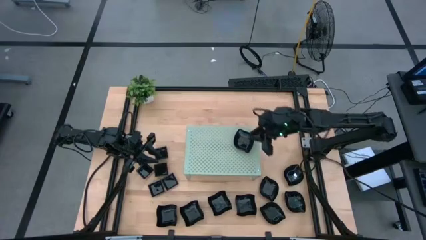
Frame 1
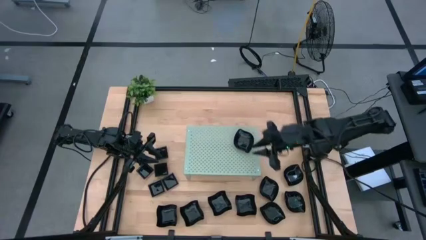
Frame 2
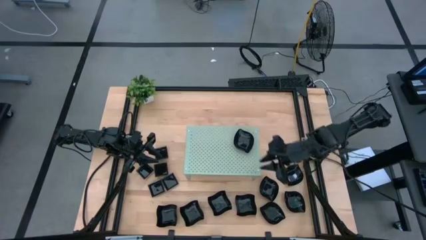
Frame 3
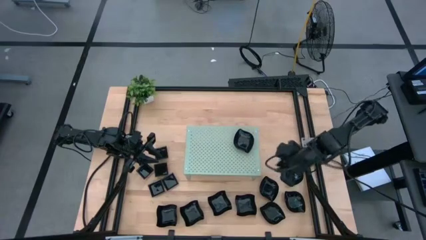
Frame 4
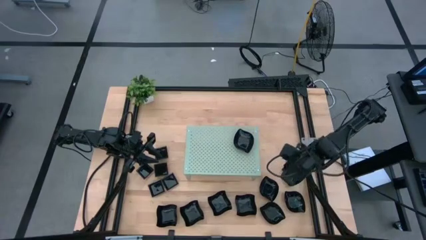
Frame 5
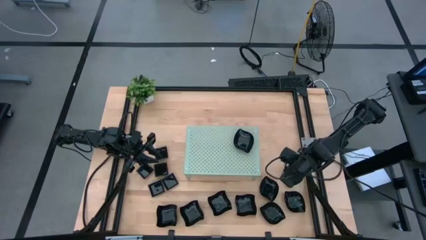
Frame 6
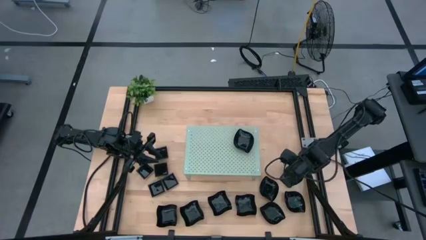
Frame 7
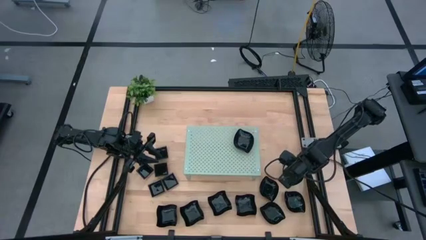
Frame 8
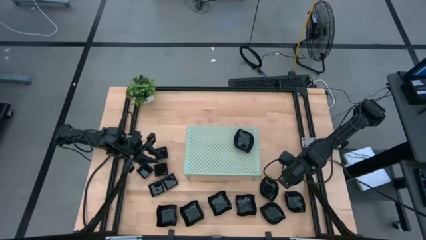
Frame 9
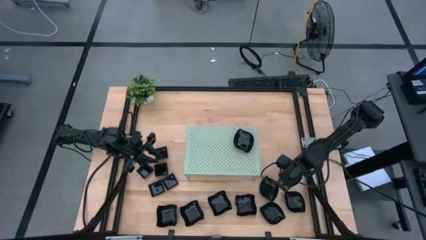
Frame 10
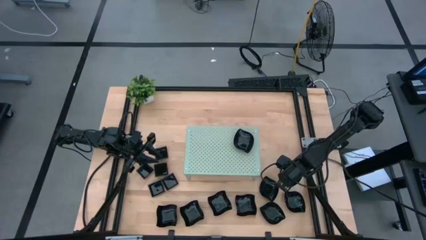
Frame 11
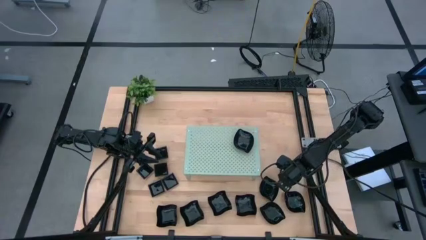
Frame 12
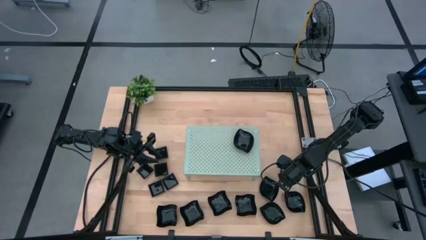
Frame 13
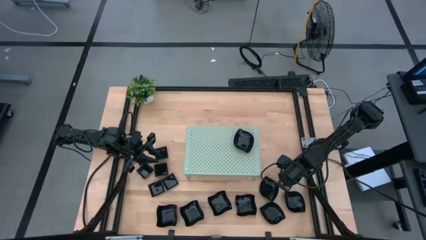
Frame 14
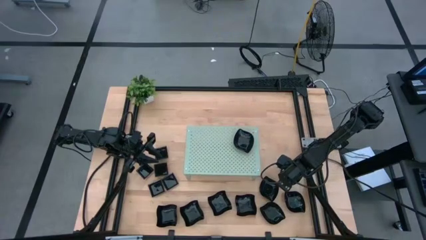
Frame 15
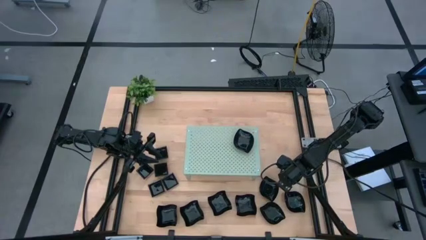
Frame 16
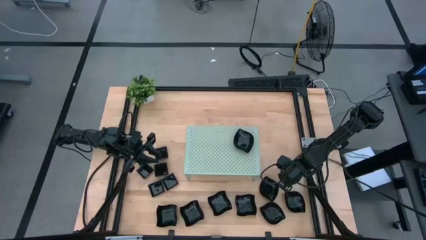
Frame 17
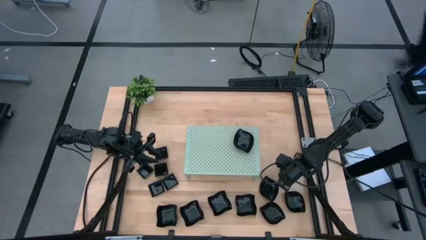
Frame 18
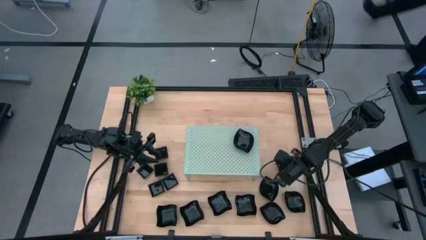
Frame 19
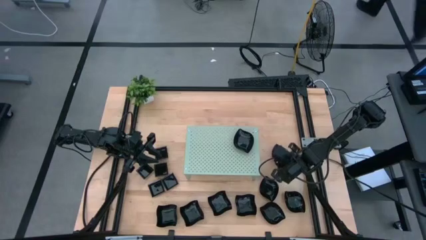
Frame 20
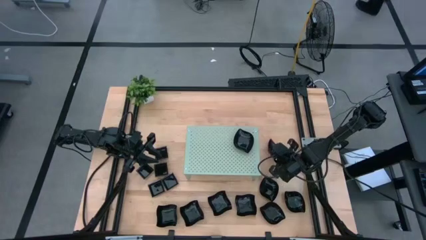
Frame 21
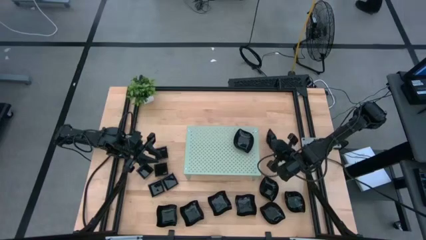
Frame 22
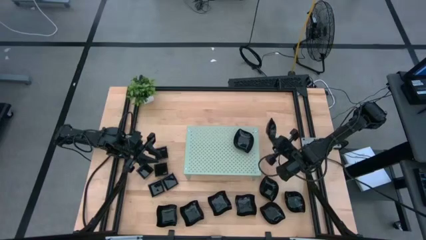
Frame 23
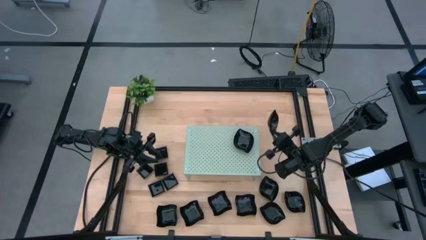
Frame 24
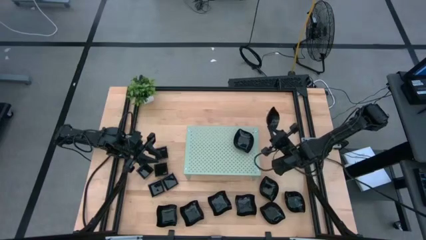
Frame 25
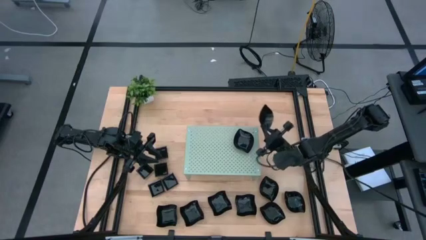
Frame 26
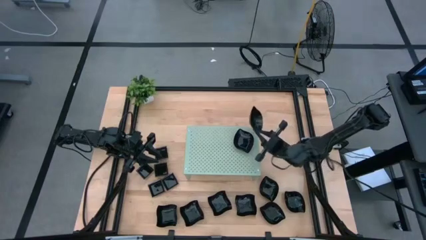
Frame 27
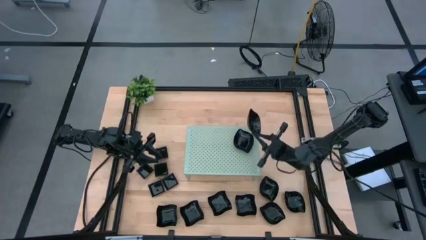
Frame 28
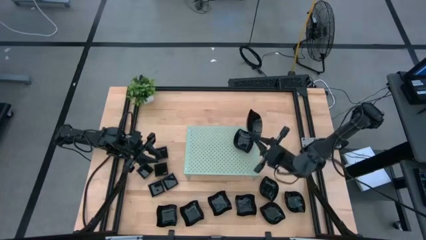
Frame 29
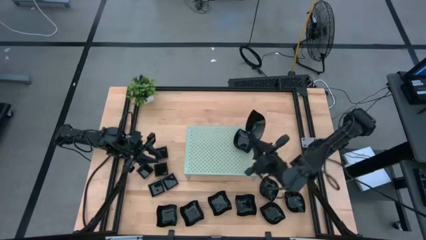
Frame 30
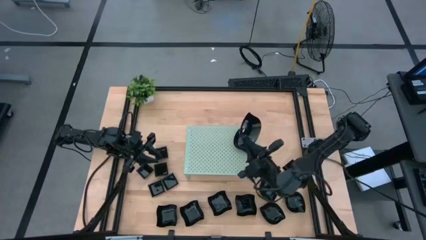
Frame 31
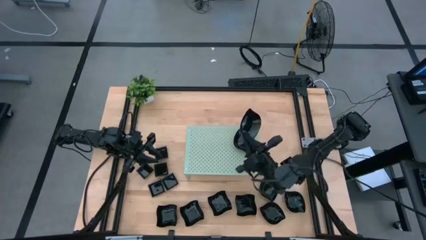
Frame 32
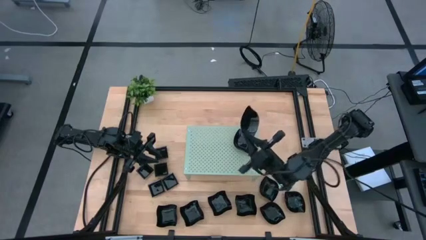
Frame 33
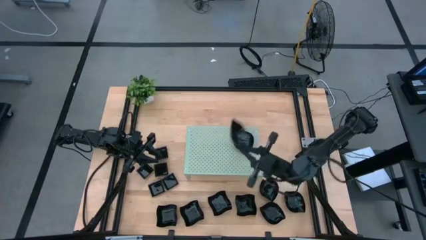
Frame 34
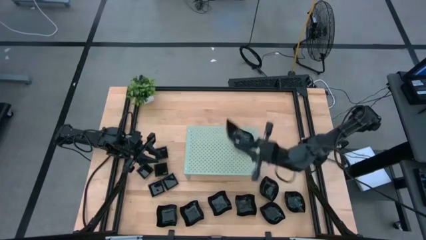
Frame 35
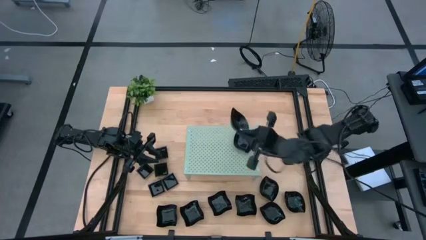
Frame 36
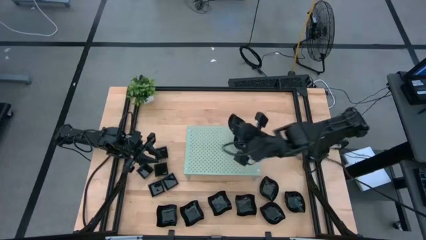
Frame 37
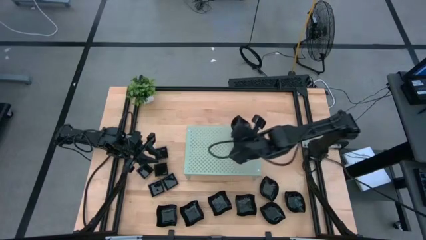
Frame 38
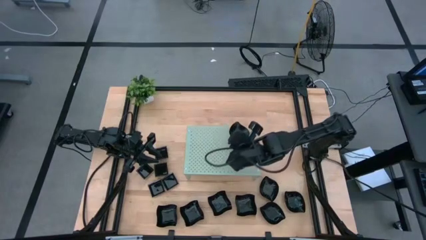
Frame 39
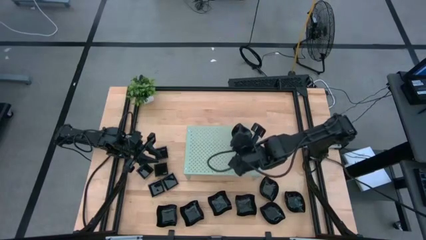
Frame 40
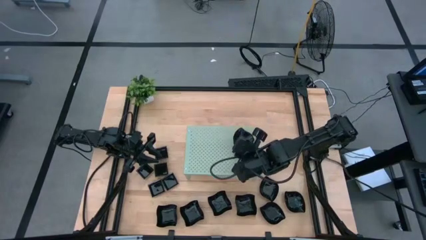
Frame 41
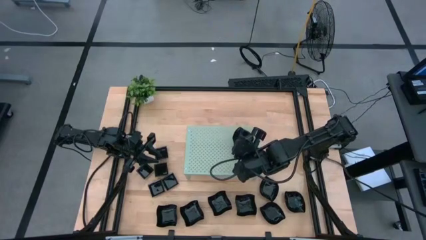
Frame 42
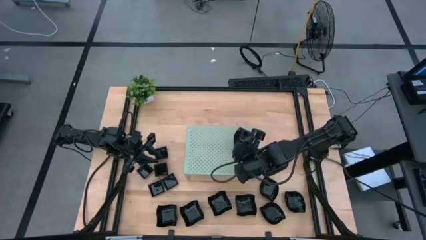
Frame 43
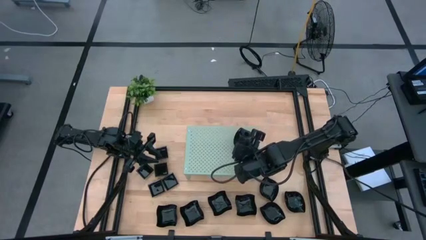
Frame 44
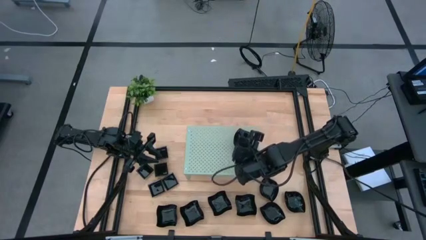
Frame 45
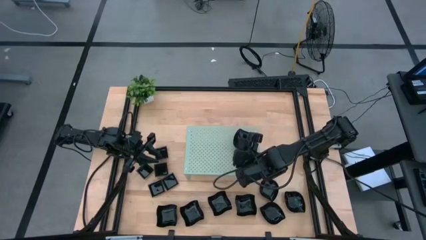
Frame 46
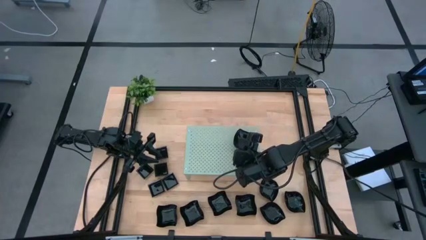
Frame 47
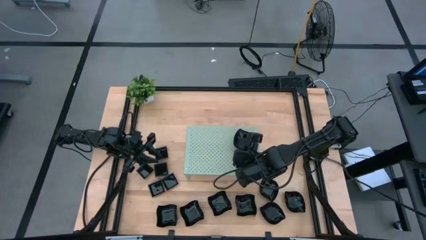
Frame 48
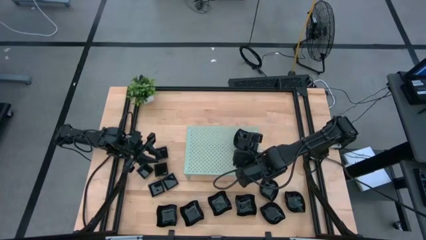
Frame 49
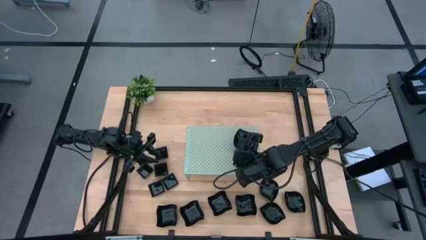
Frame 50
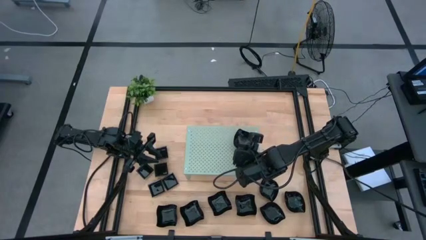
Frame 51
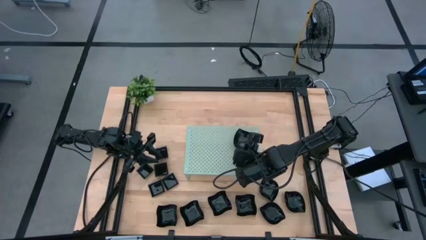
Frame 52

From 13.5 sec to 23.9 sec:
Task: Pick & Place Mini shaped plates
Stack the leaf-shaped plate on top of the leaf-shaped plate on the shelf

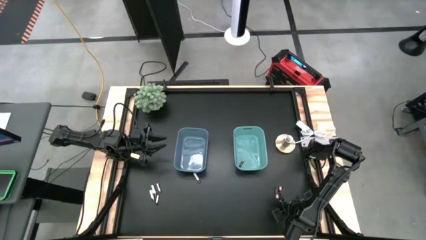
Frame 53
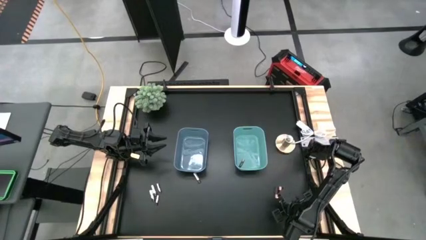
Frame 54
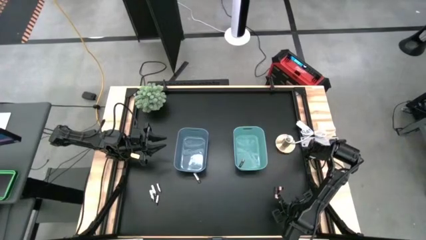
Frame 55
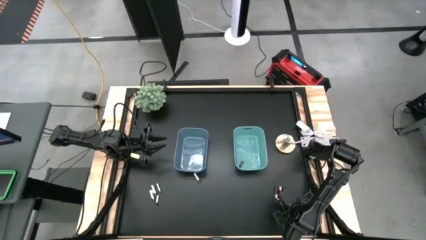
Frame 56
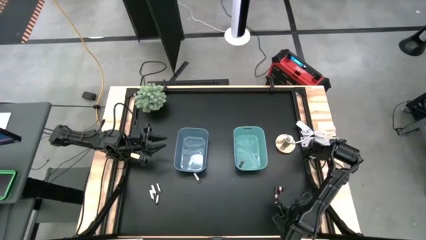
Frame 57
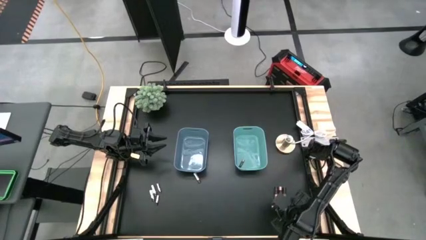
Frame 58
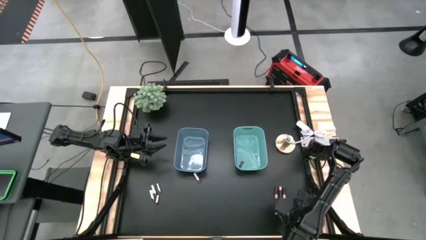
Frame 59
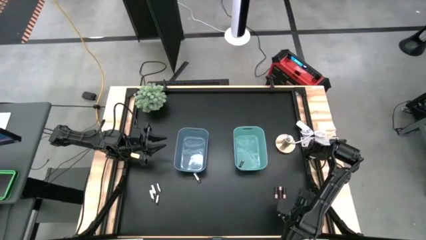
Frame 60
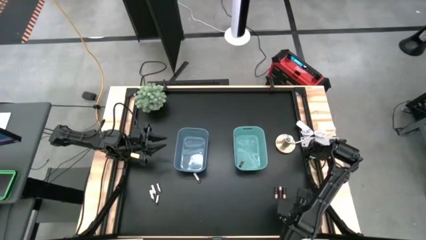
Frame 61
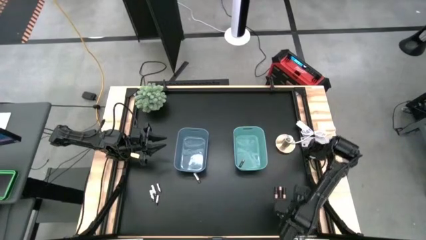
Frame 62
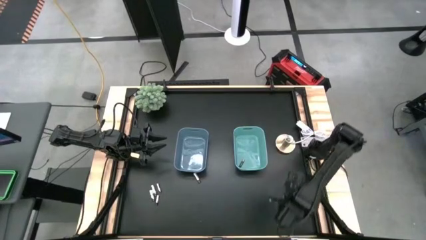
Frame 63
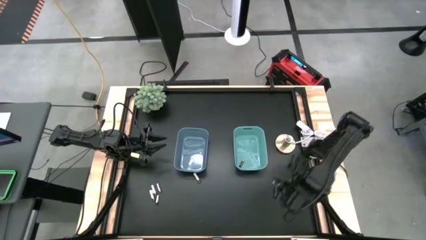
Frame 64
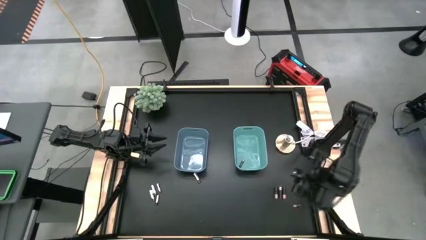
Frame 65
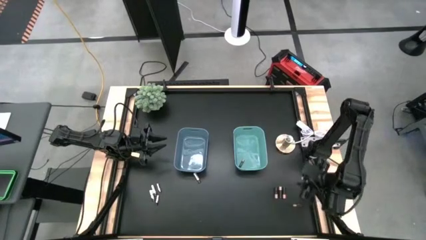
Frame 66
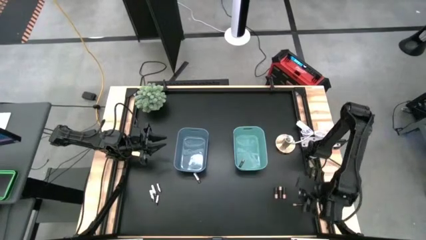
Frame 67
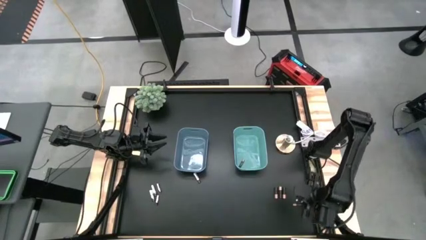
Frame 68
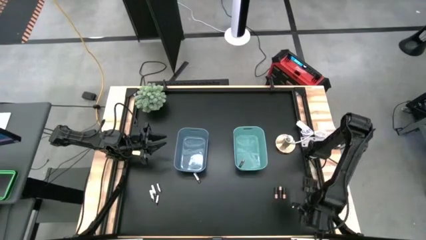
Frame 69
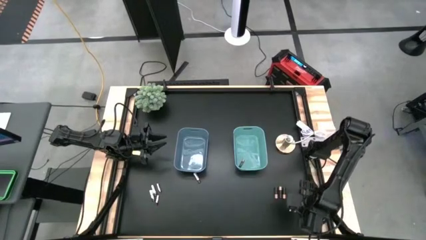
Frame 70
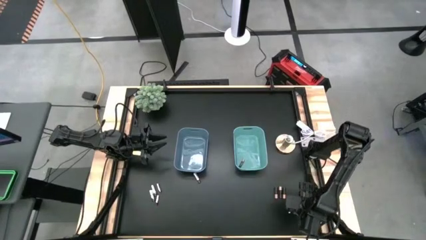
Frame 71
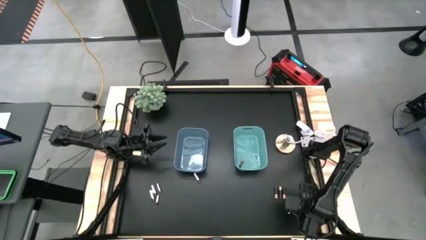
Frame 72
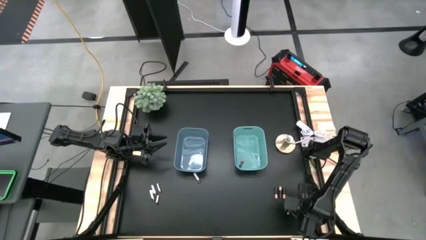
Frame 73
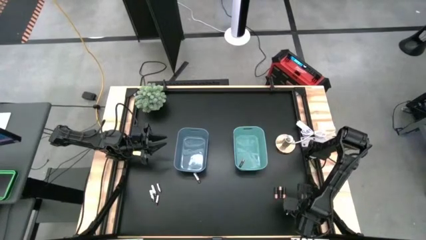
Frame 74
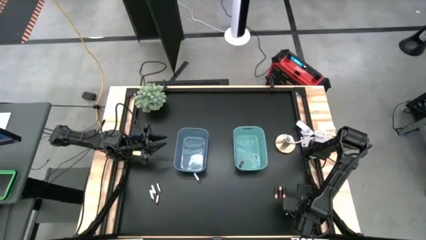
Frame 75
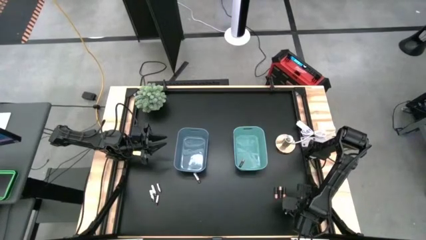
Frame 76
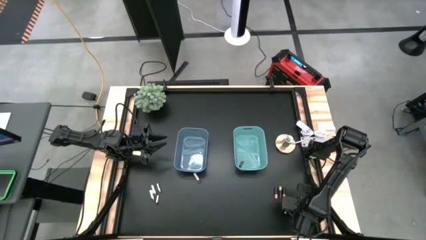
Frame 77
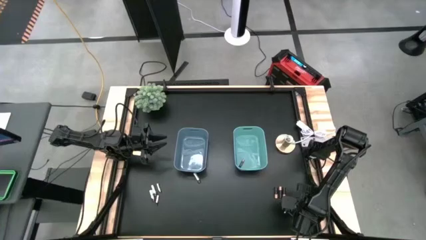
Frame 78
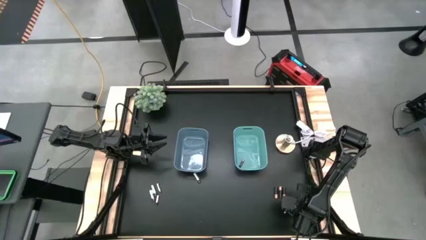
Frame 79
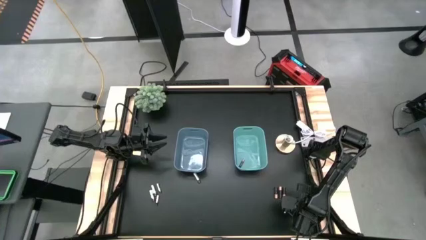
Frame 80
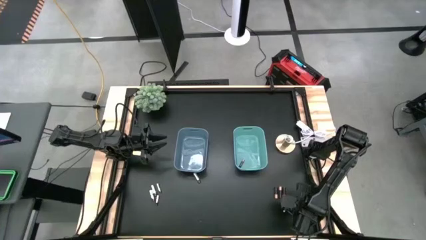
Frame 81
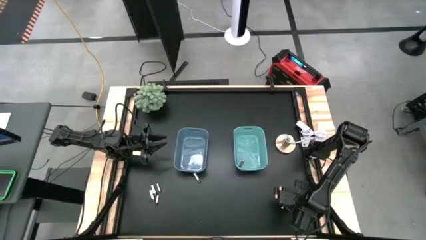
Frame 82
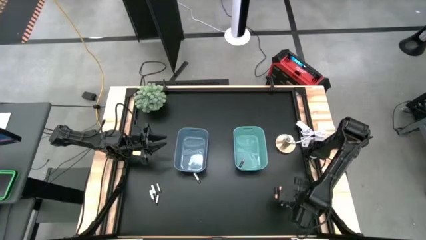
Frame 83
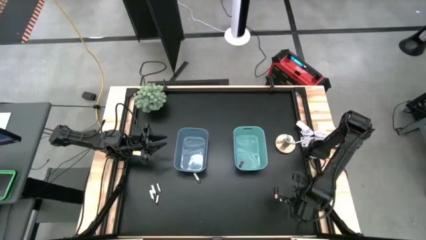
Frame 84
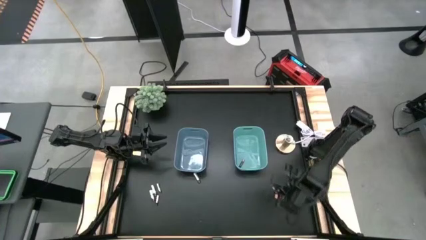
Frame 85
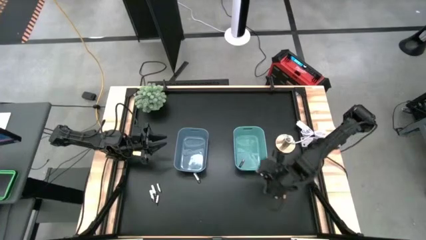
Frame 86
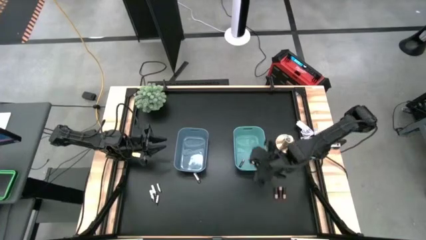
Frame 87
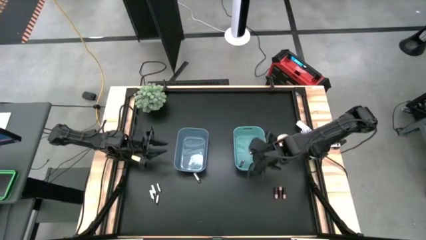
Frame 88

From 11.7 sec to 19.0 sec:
Task: Sort batteries
Put the small black battery into the green bin
